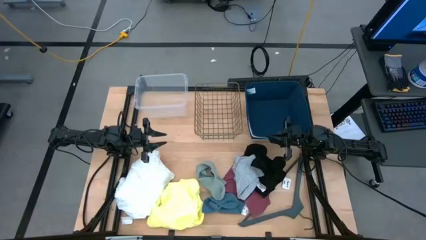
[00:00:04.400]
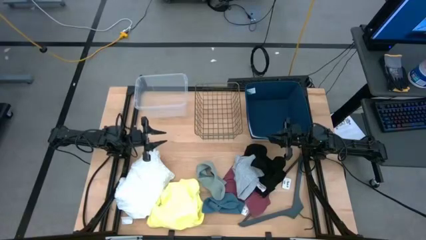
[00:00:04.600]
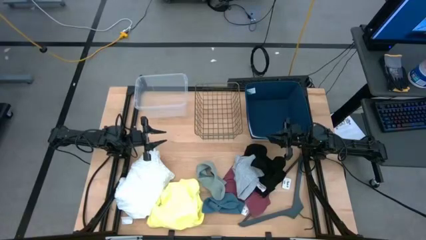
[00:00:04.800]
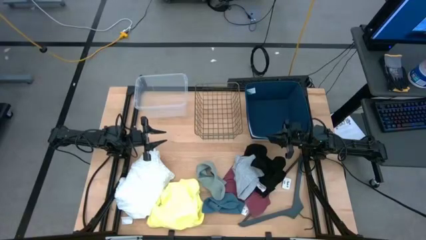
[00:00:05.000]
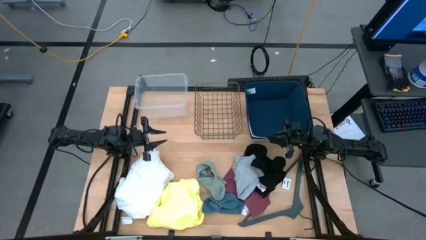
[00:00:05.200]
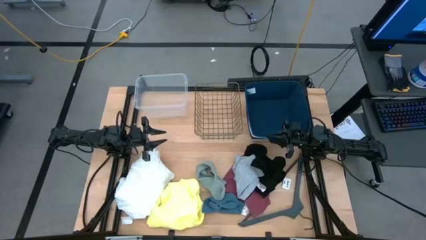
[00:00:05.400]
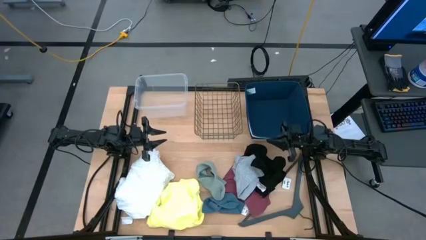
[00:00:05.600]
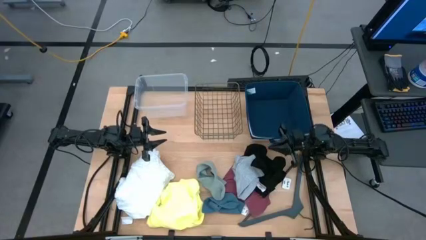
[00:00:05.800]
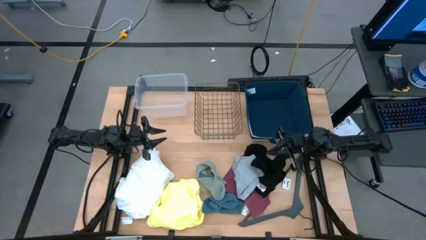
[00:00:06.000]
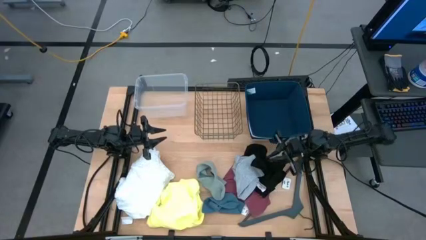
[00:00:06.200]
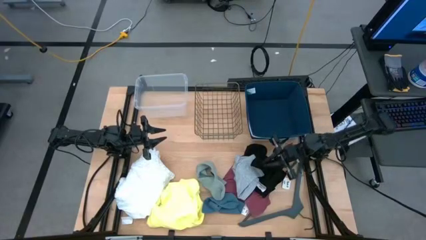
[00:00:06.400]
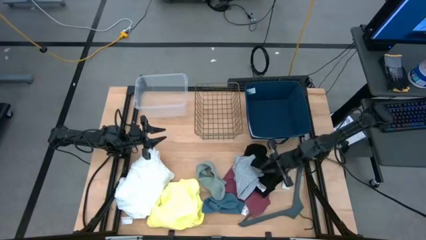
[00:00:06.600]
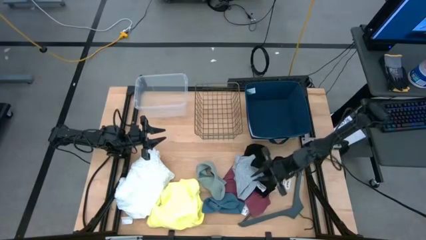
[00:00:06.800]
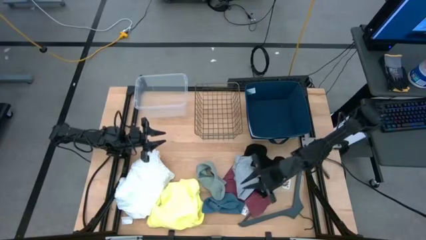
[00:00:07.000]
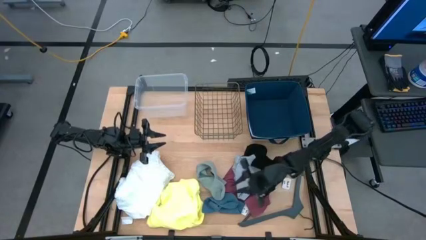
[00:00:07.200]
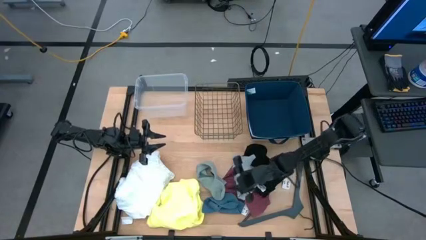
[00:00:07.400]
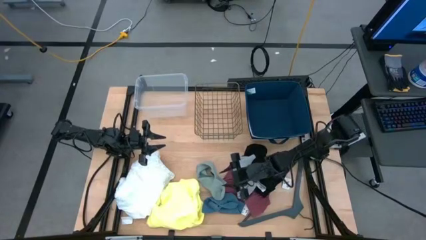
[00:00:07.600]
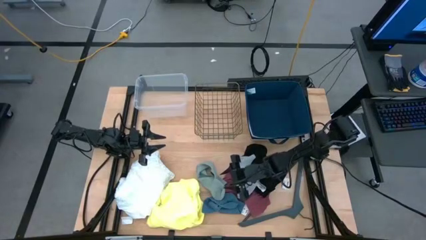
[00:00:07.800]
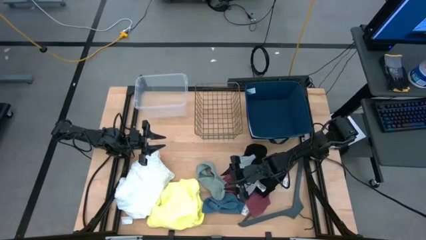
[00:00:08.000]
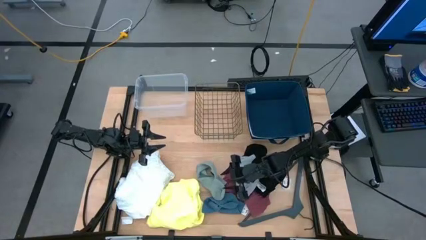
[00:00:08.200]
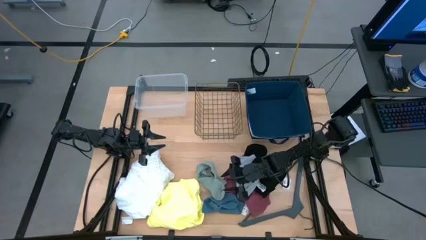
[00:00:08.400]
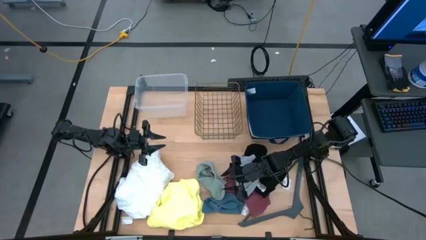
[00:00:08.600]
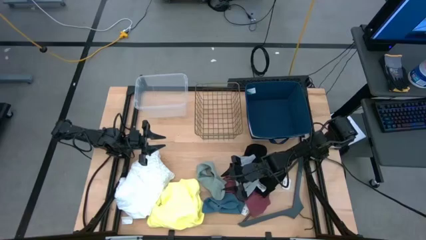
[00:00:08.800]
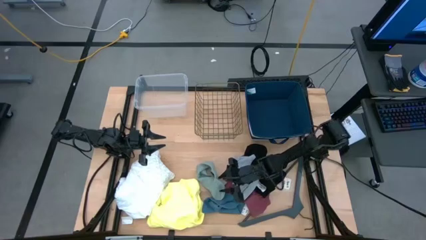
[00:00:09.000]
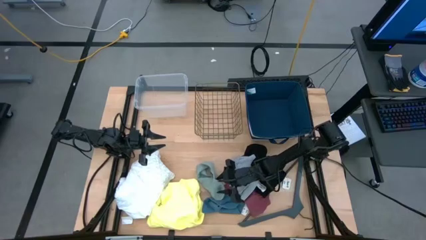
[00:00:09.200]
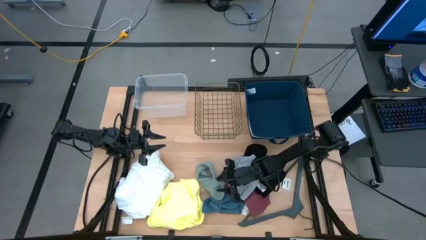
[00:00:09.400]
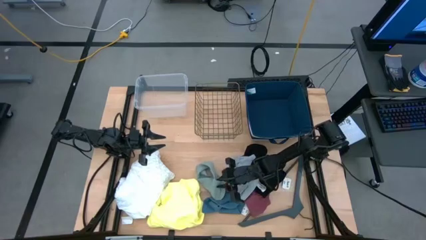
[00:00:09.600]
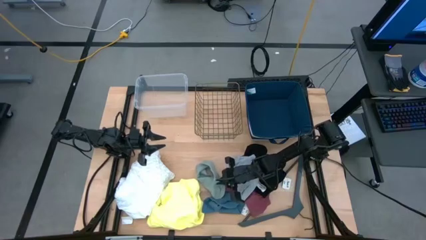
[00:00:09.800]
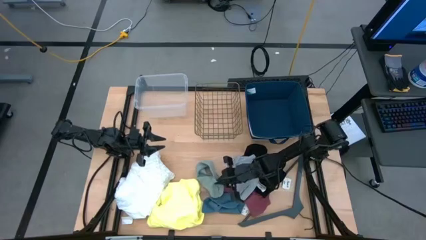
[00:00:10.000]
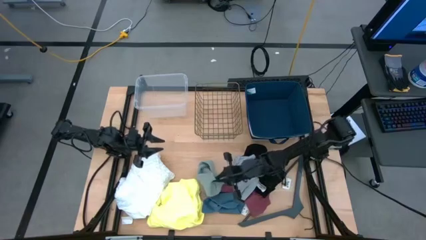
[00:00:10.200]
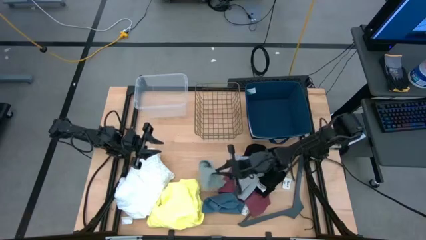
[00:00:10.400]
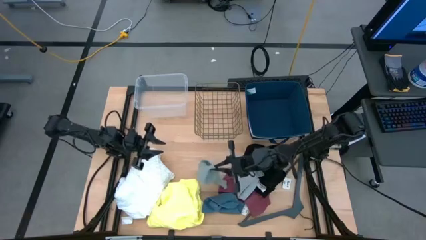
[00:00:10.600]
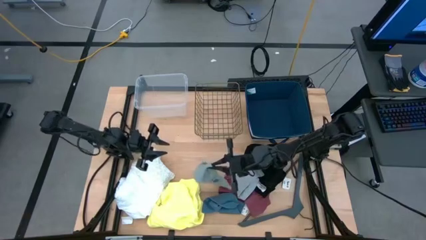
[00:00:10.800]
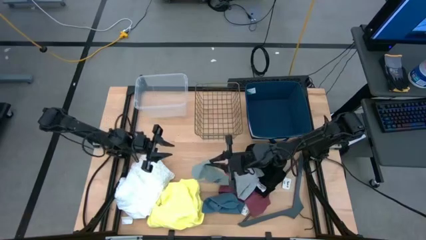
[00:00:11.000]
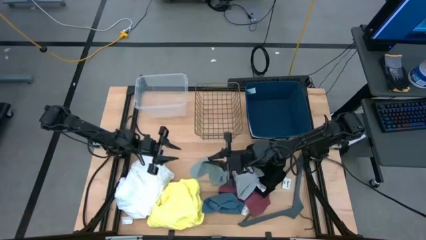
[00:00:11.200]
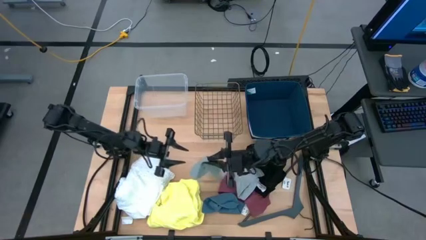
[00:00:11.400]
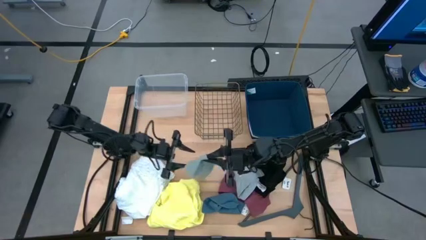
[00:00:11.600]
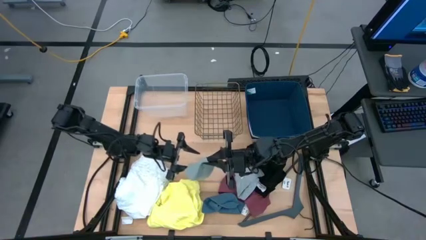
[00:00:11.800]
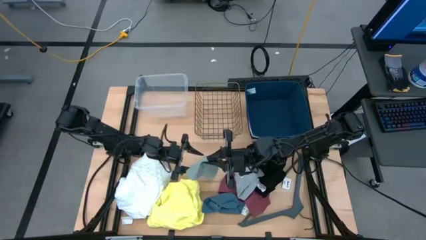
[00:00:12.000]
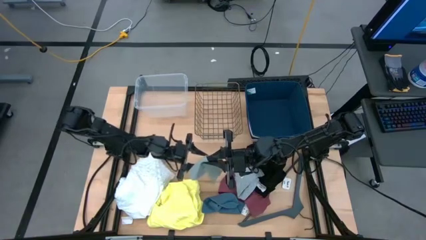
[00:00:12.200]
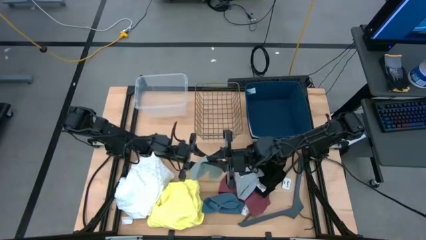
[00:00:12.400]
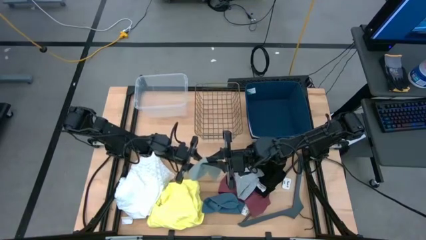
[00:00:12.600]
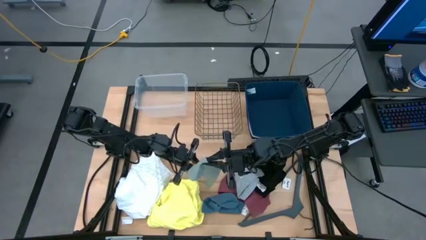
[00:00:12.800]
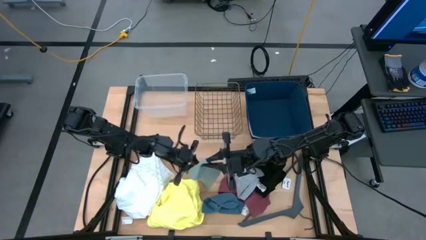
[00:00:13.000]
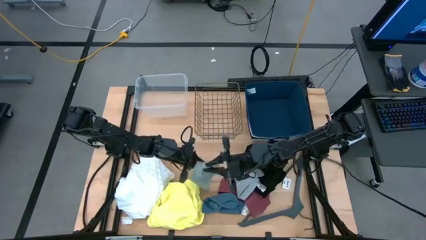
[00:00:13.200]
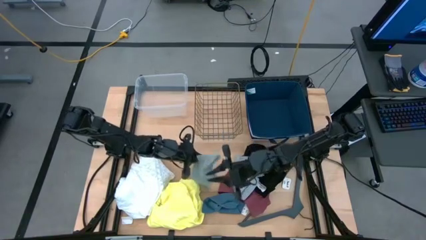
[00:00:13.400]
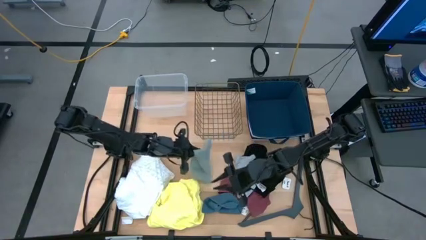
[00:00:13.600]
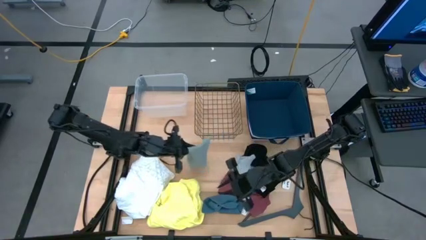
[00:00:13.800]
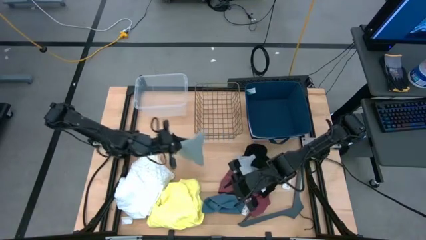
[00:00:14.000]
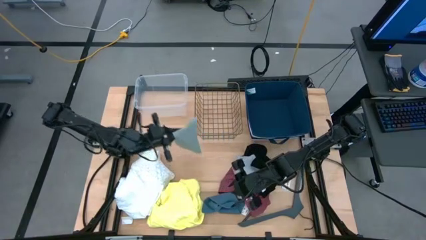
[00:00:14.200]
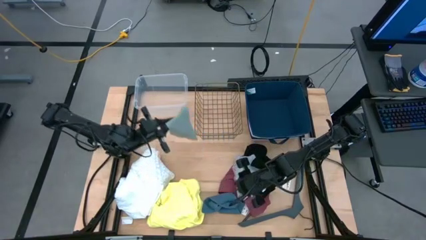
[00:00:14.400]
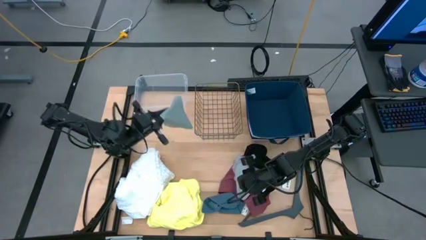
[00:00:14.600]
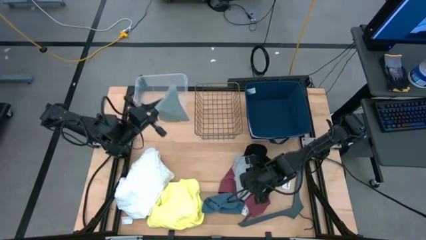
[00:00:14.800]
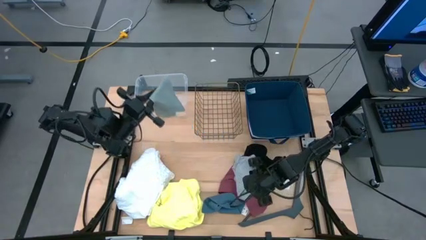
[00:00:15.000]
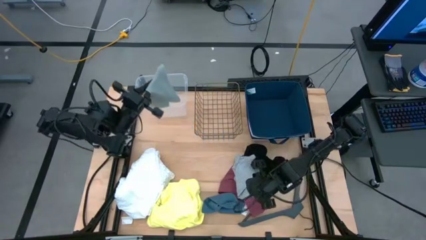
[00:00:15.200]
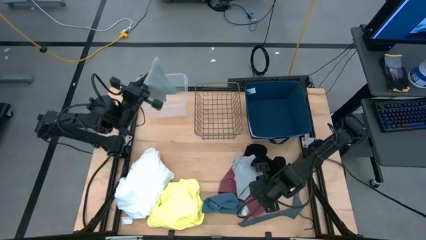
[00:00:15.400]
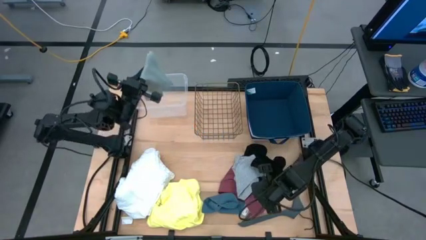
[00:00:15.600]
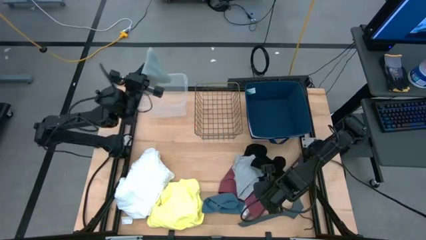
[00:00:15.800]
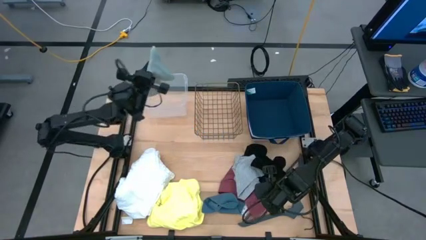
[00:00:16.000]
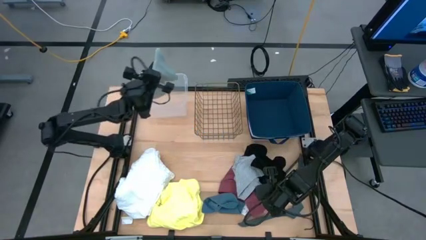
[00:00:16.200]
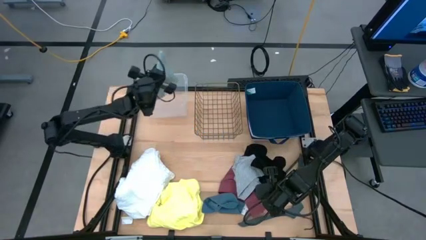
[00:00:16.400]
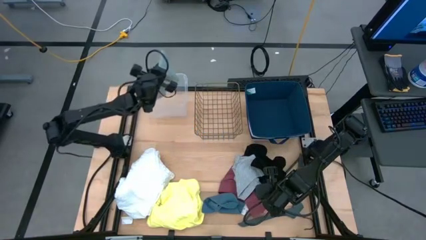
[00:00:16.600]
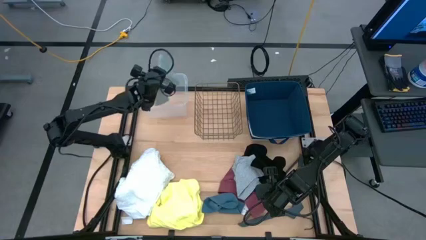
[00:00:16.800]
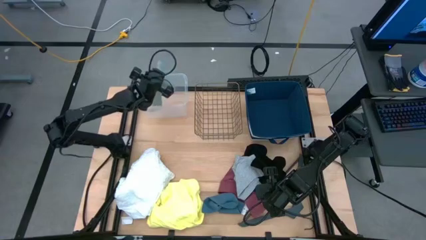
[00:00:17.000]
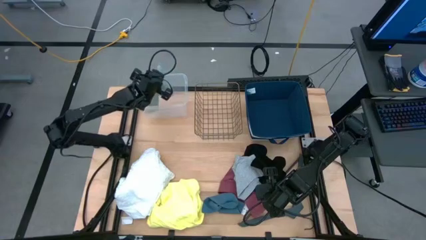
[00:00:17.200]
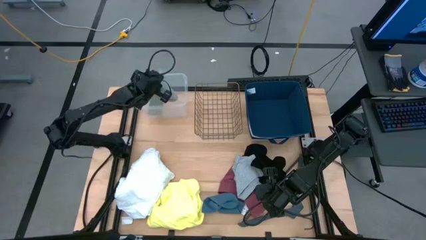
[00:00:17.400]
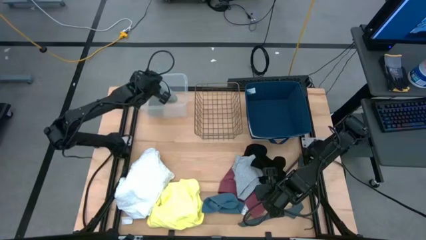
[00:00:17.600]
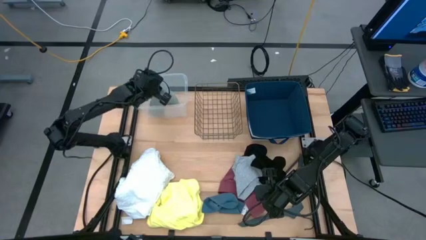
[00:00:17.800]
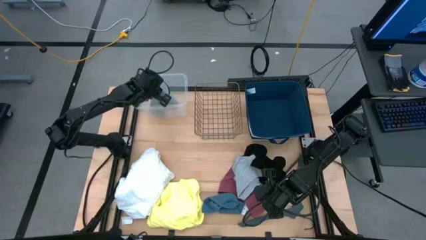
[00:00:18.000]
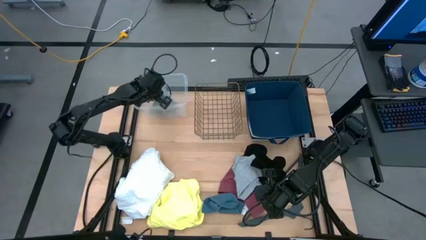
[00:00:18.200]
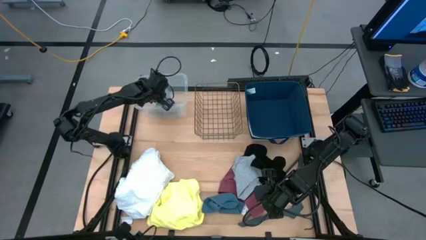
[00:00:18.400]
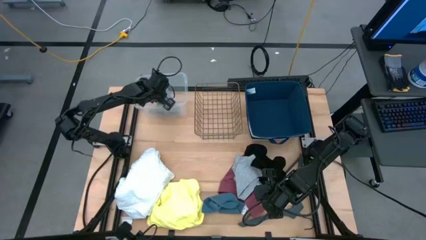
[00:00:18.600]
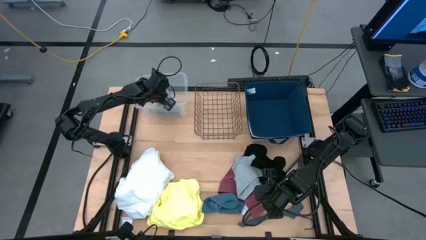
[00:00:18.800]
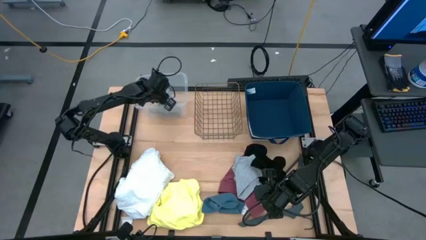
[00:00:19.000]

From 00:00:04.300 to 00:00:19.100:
Task: Pick & Place Cloths
Put the grey sock into the transparent container
